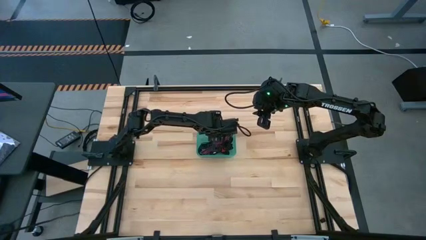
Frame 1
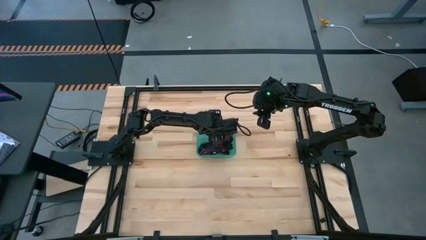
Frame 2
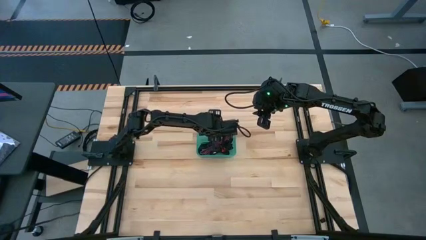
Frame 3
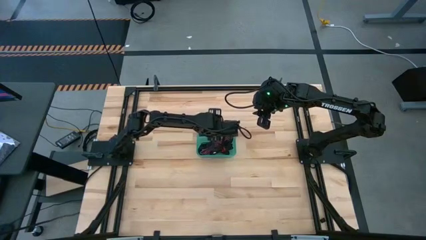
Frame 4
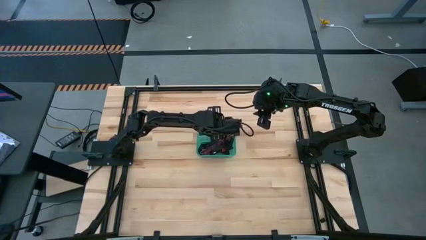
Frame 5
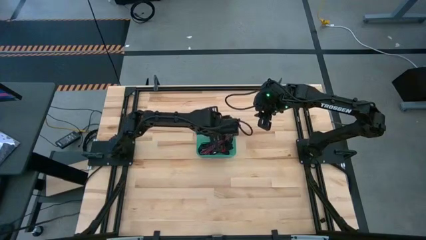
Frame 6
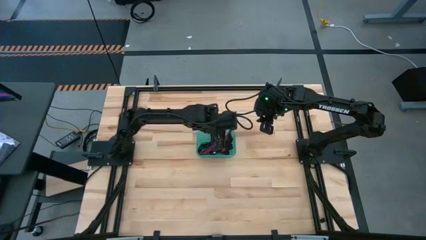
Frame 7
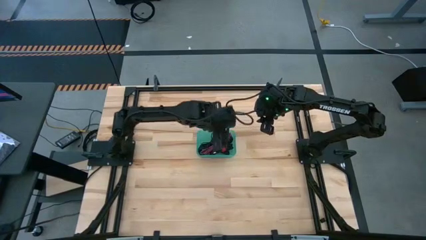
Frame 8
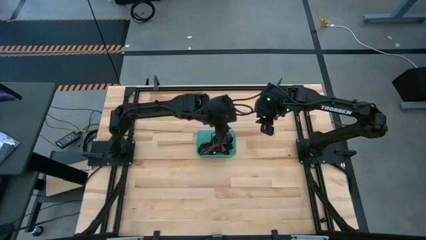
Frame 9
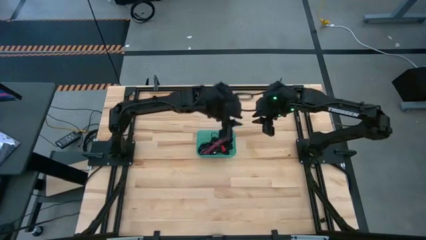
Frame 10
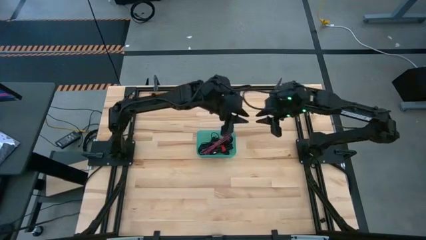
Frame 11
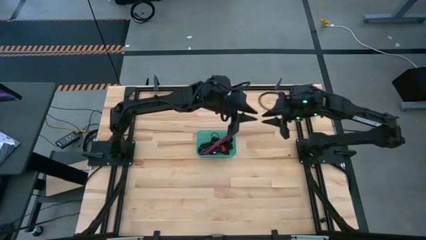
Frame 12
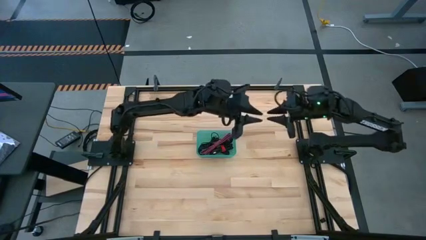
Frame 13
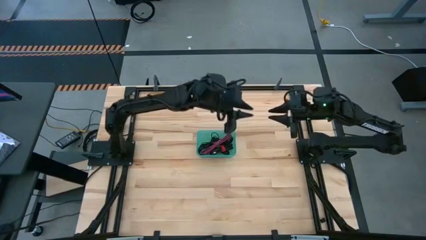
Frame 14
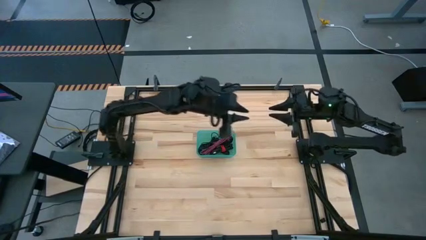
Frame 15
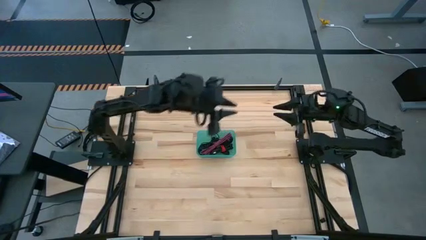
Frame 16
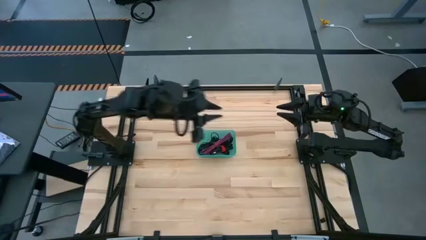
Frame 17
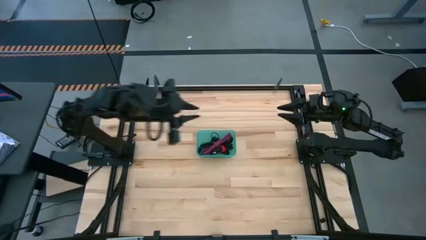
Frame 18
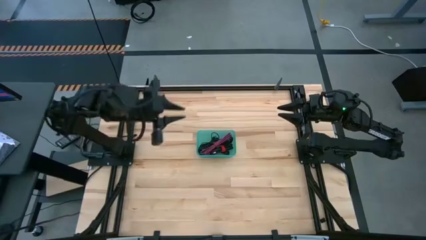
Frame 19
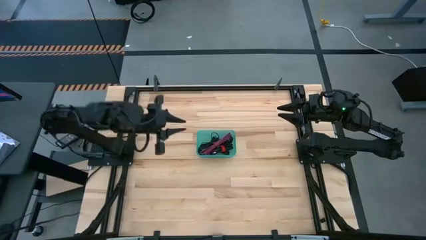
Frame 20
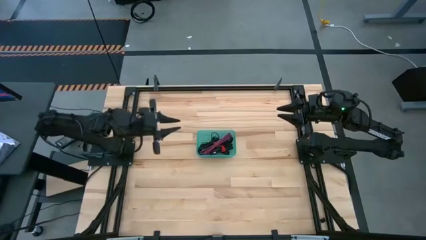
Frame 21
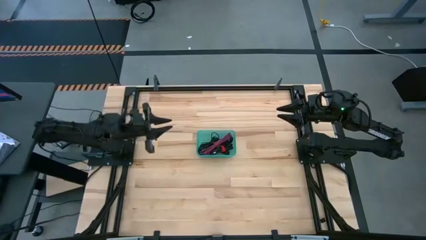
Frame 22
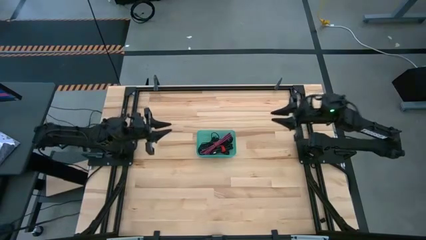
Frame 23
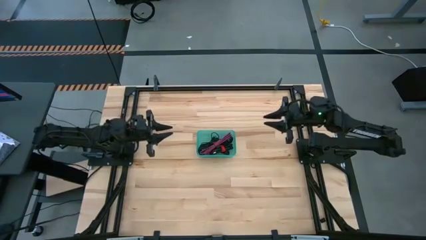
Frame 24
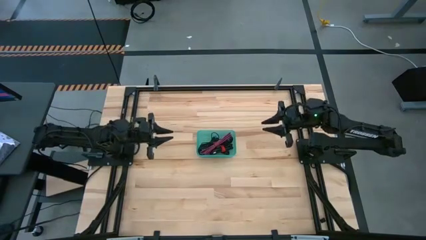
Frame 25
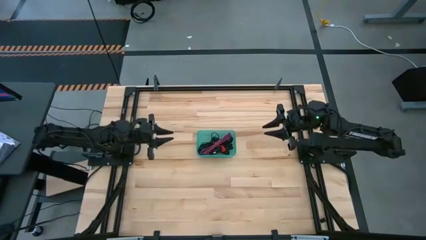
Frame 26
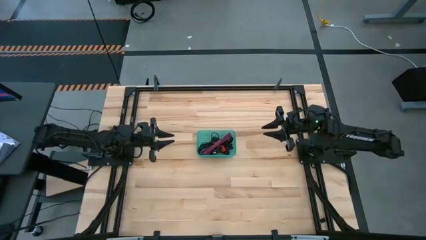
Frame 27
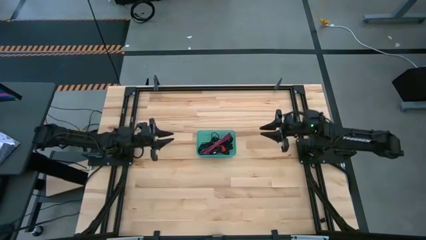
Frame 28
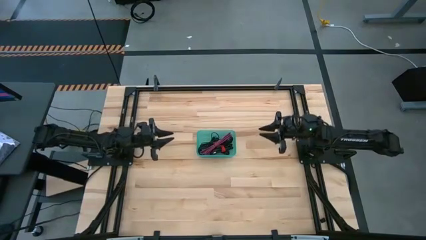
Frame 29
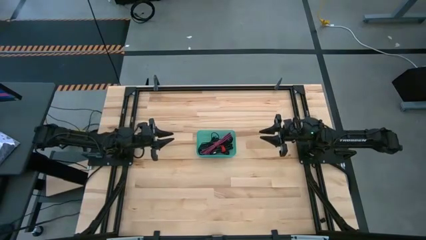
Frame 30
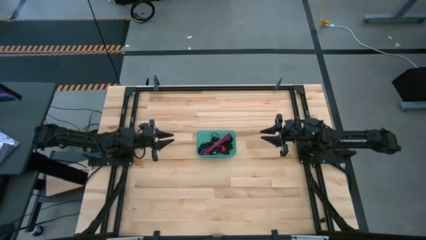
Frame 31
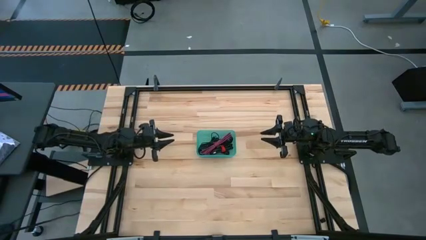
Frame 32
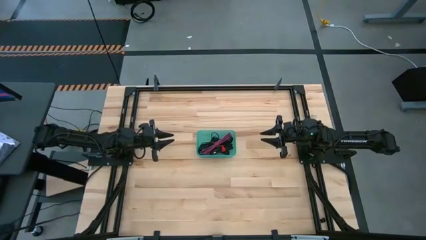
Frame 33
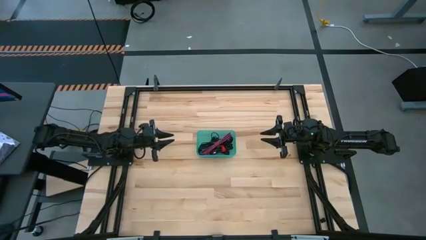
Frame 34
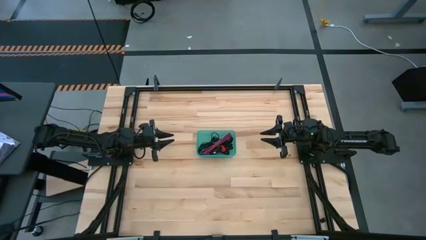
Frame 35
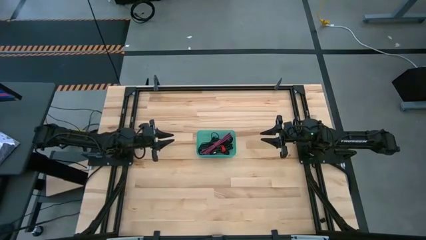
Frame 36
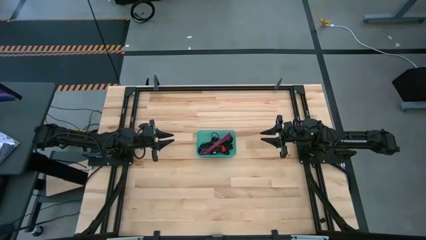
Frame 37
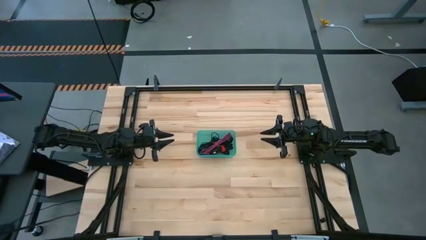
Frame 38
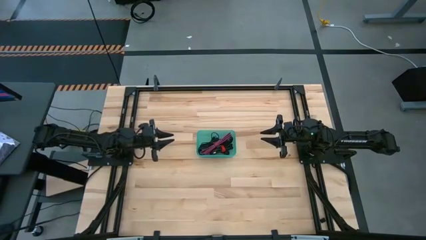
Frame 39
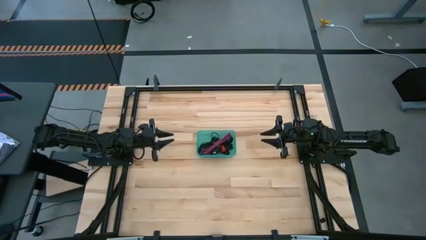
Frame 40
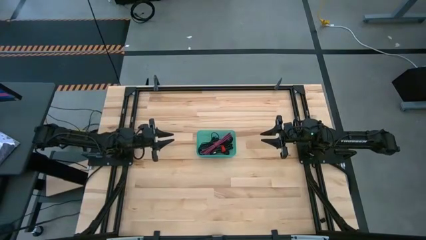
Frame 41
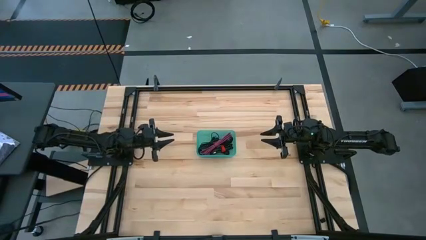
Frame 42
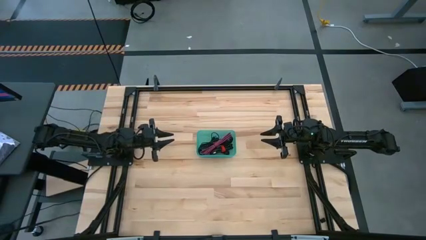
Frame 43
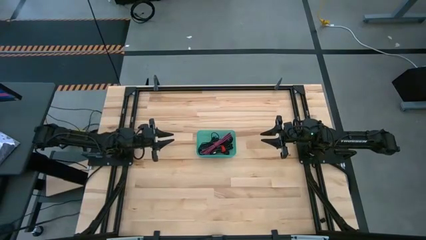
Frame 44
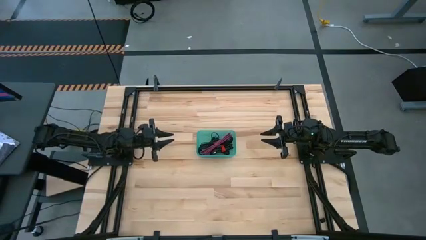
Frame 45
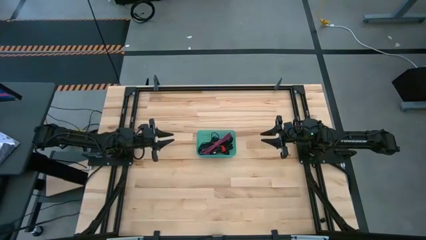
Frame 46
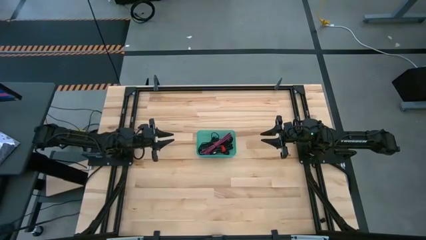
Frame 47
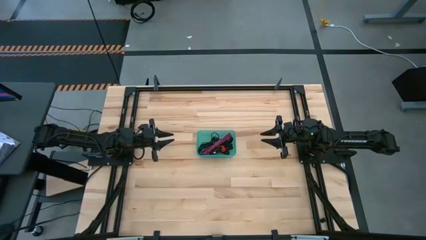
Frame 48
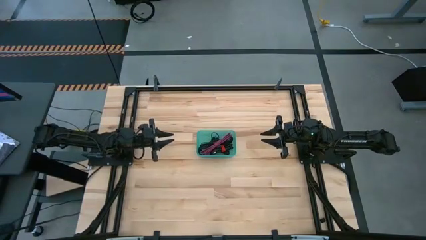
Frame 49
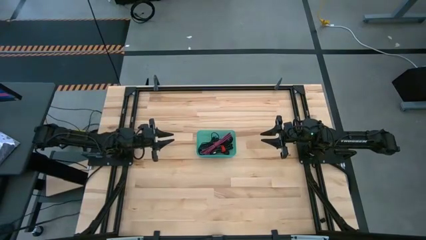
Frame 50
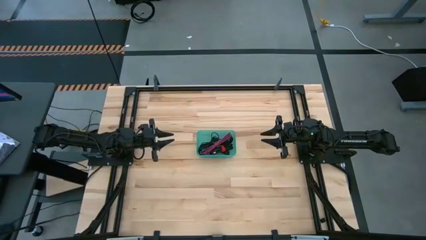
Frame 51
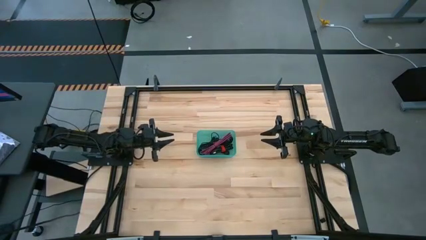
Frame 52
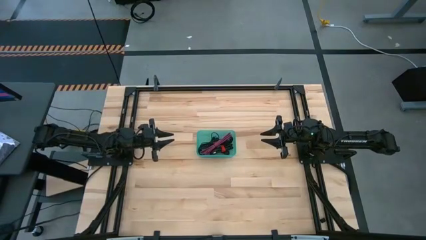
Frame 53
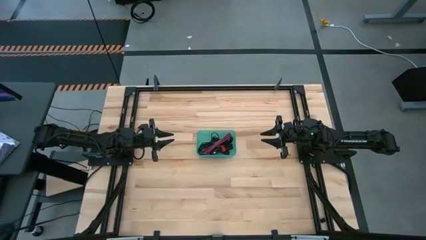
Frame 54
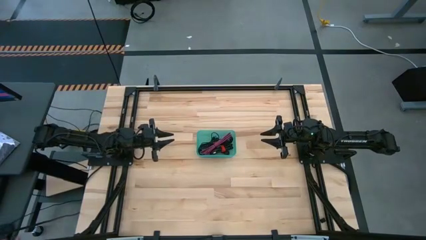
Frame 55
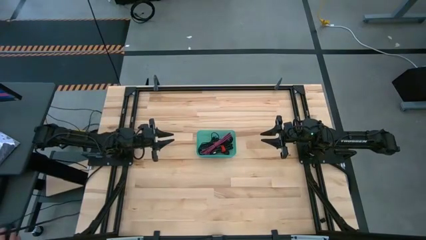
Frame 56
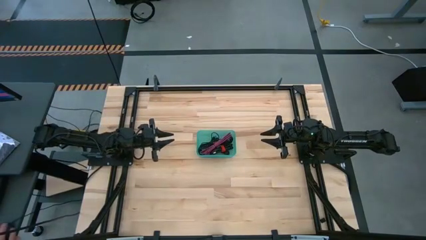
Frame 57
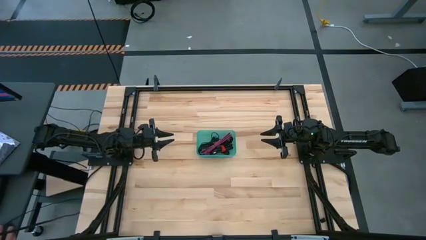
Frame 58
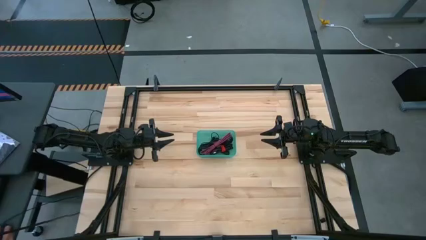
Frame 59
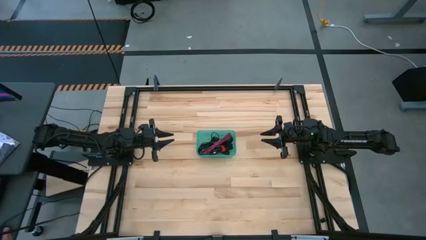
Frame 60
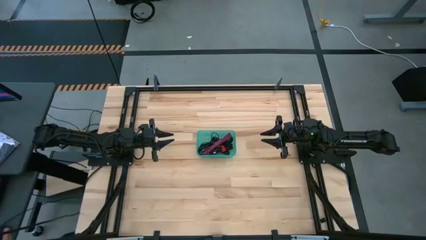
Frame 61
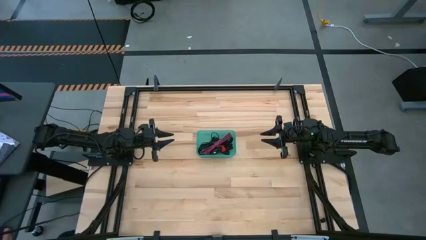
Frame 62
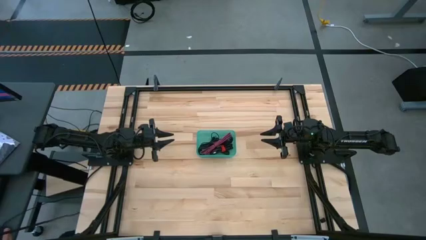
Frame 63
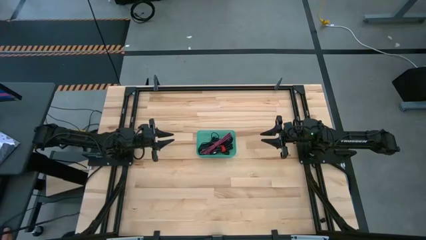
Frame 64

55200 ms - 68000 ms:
Task: Pick and place USB-C Cables
Return to Home Position
